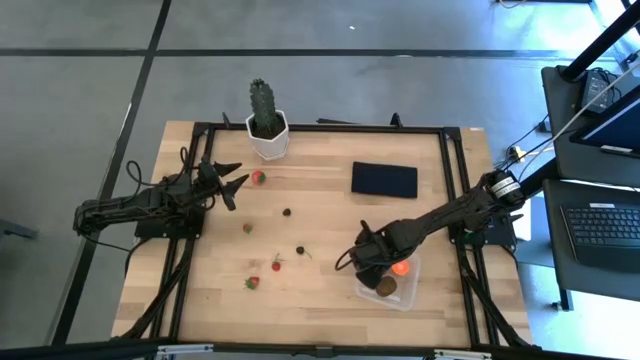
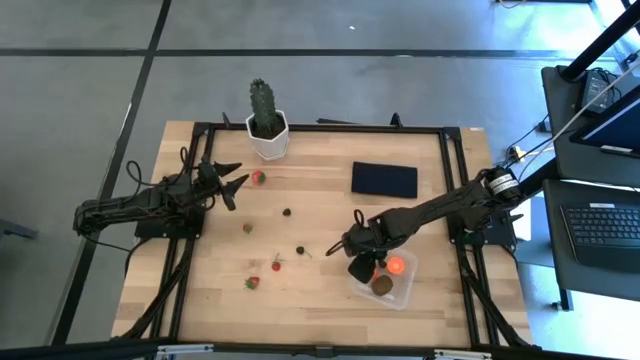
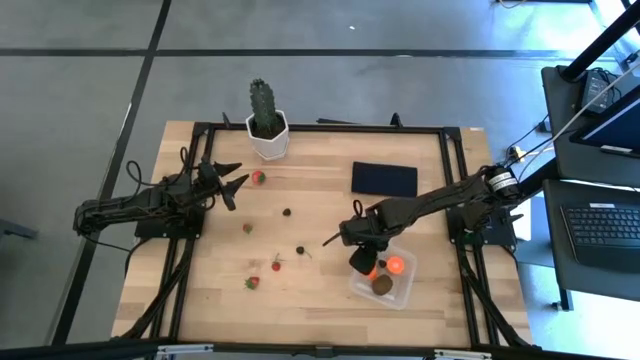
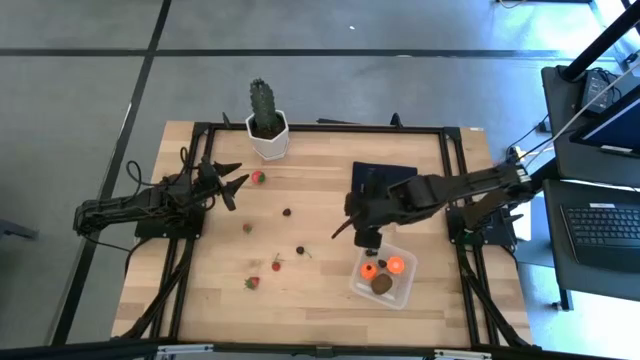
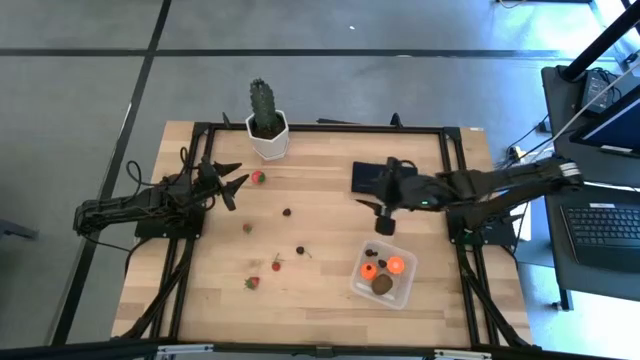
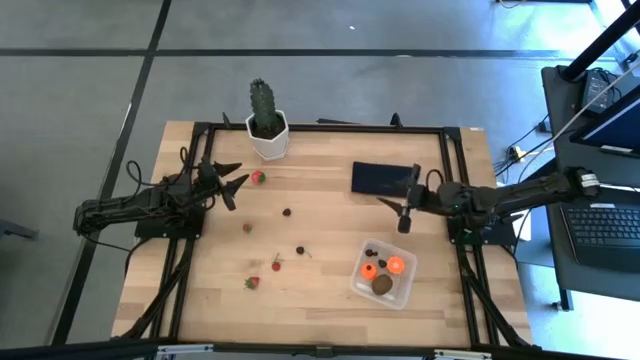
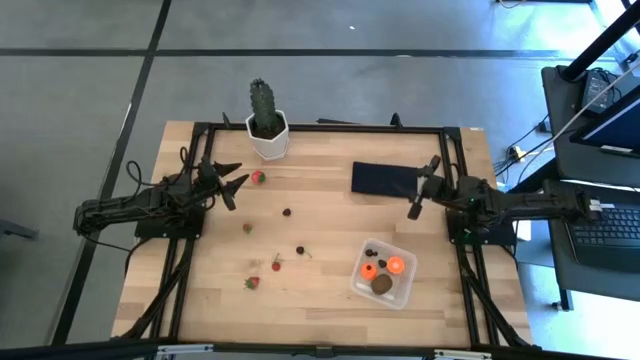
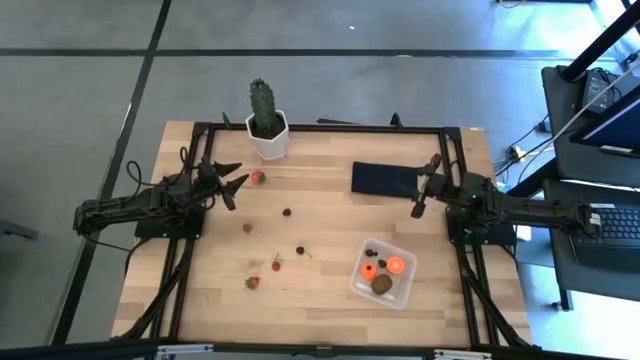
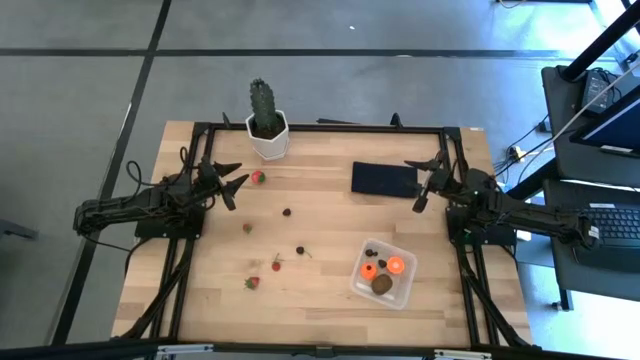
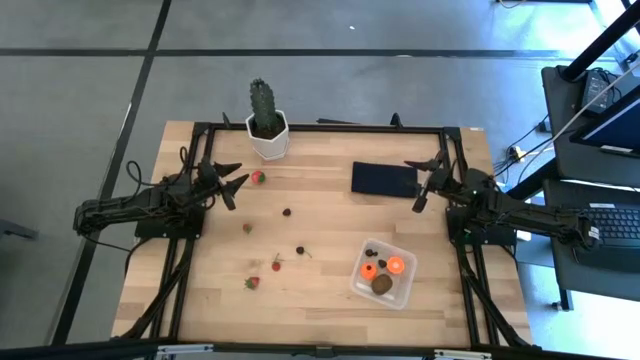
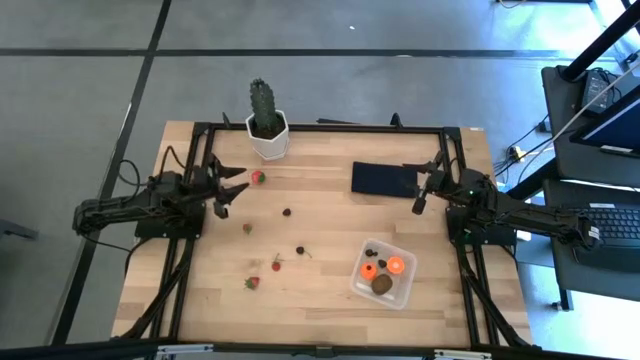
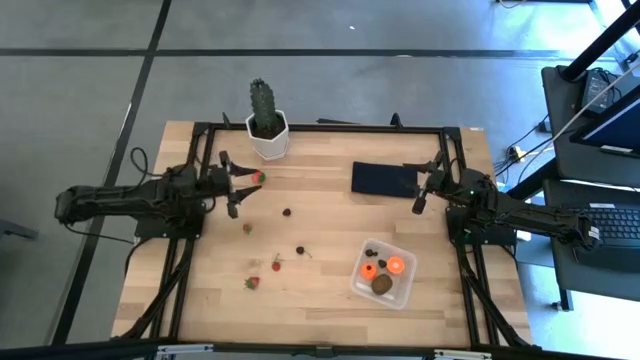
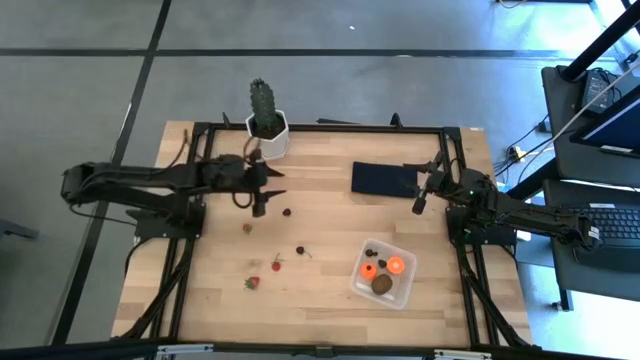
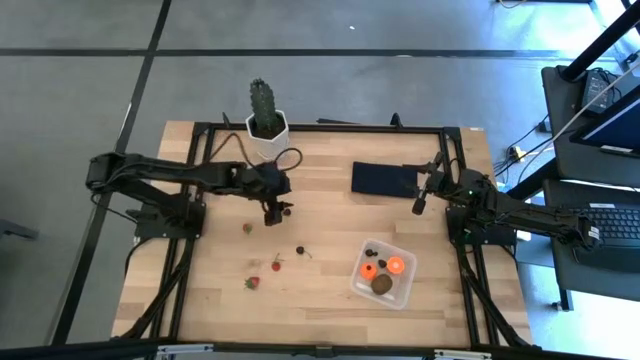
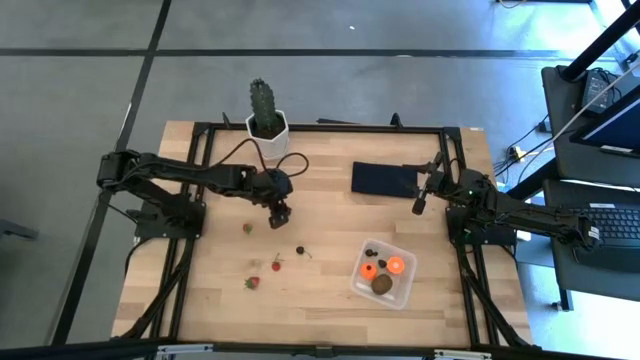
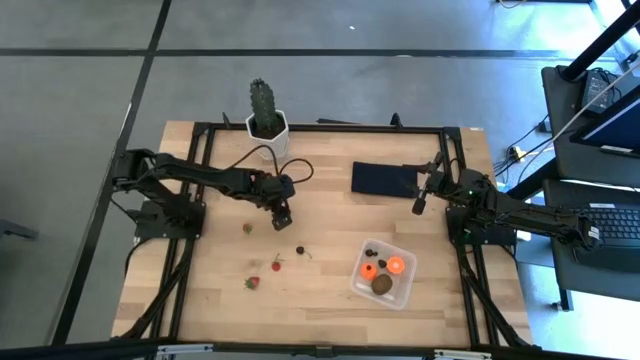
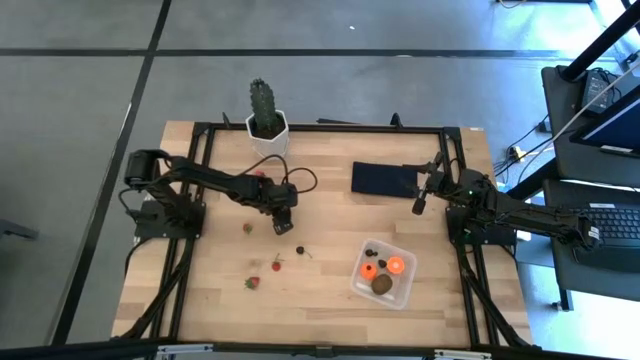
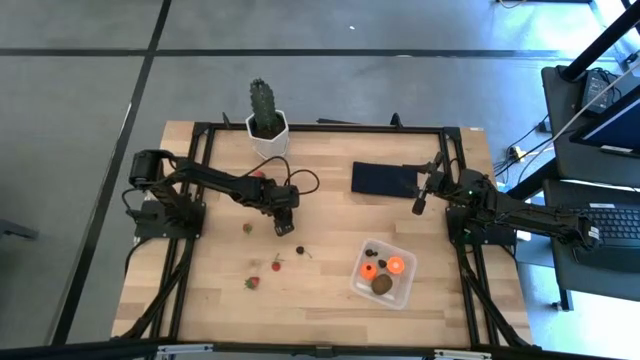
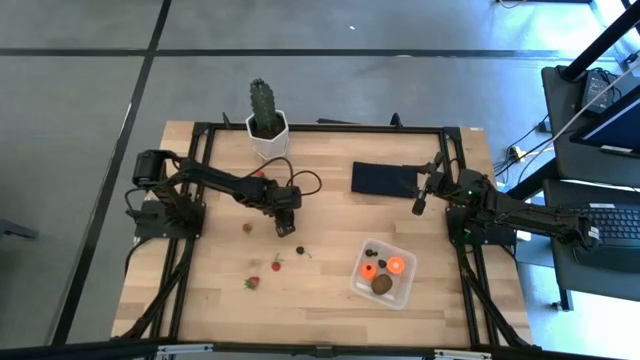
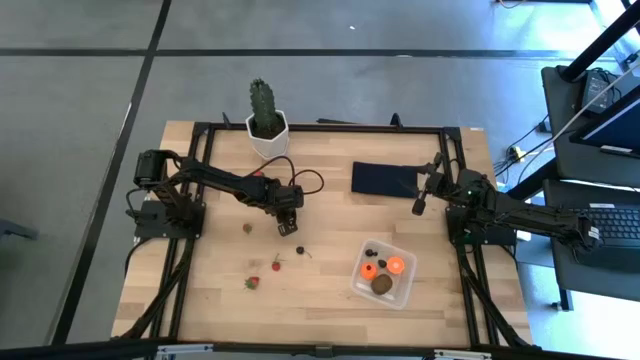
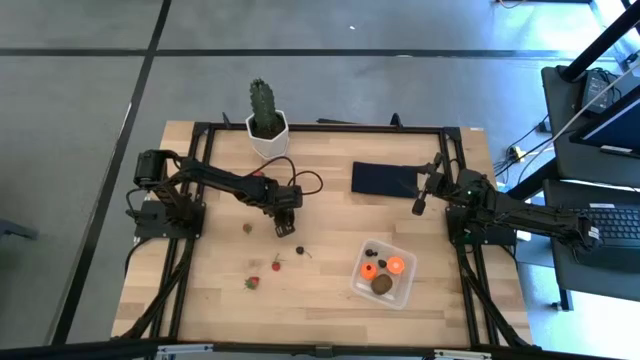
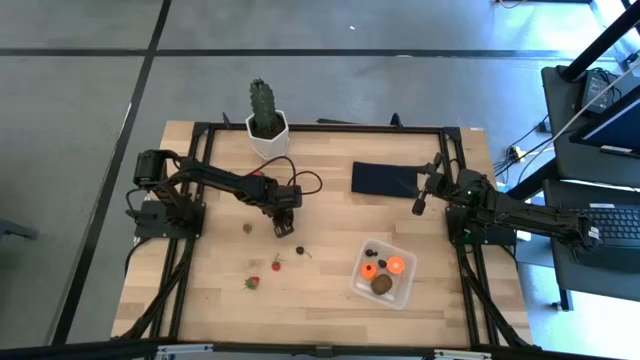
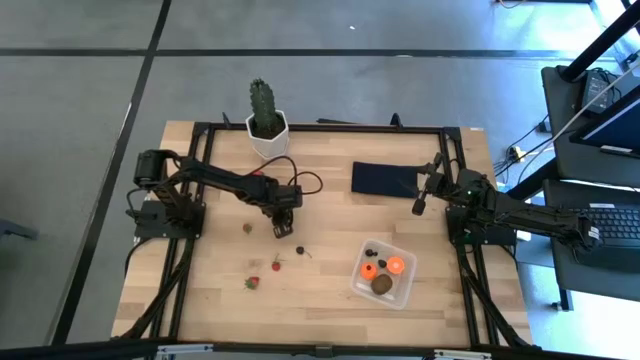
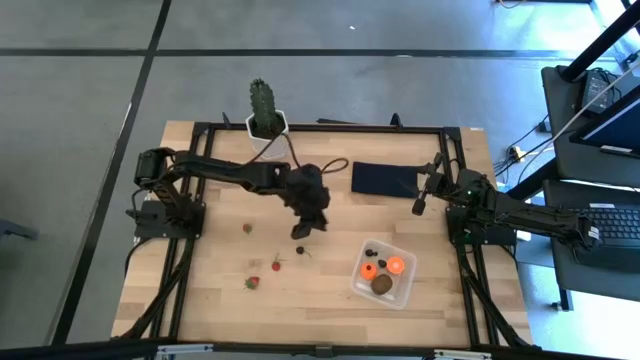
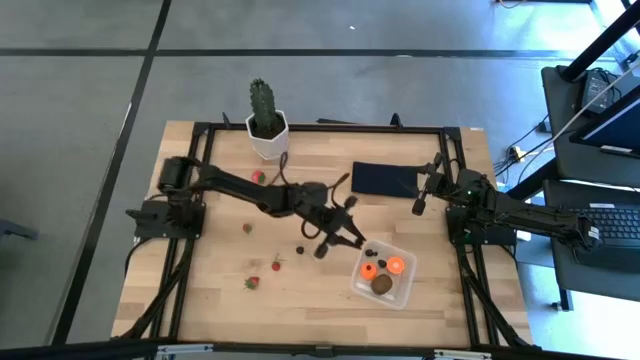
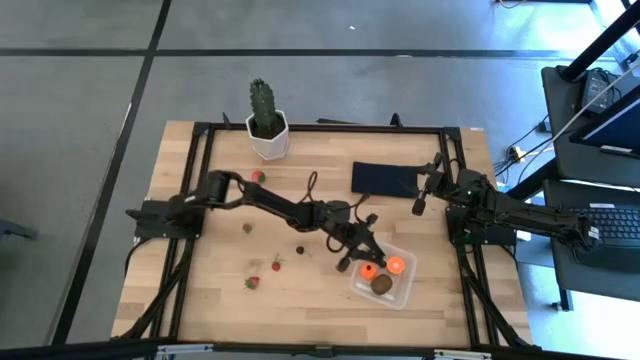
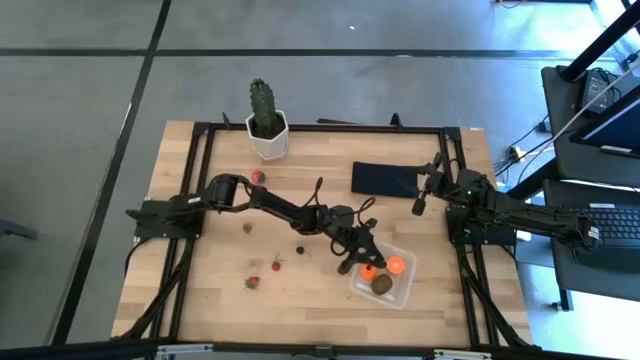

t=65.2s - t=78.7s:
Task: Pick and placing Produce into tupperware
Put the blackberry into the transparent bin

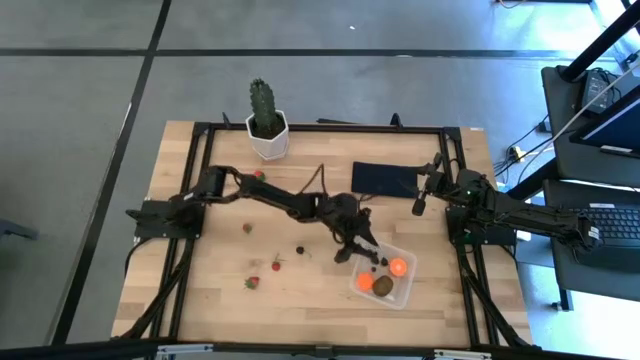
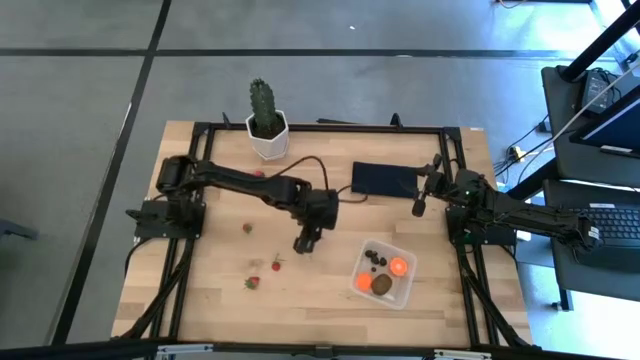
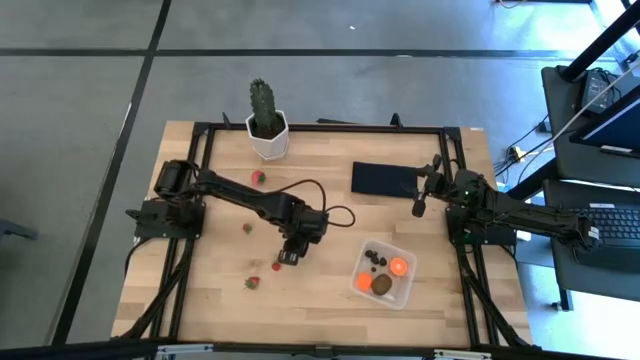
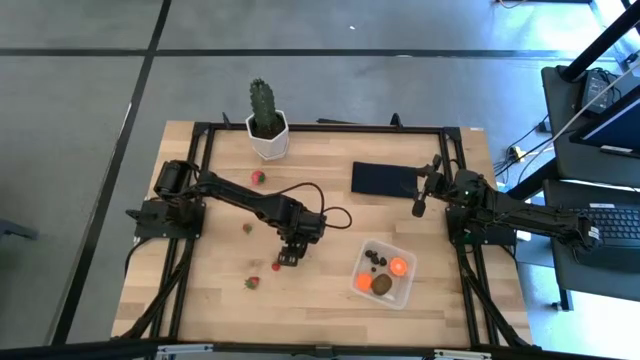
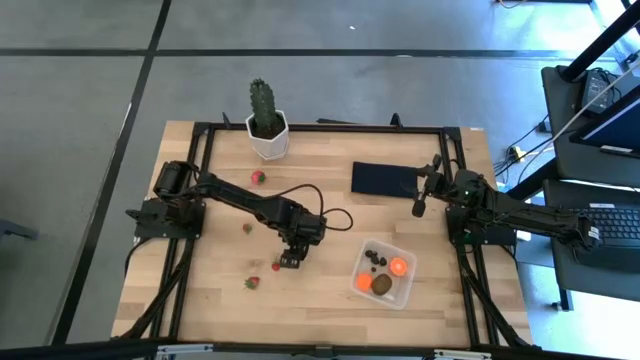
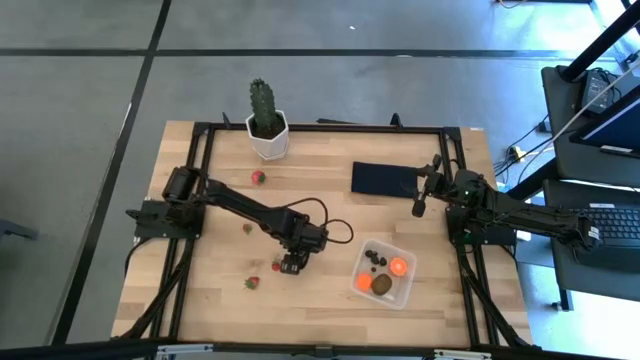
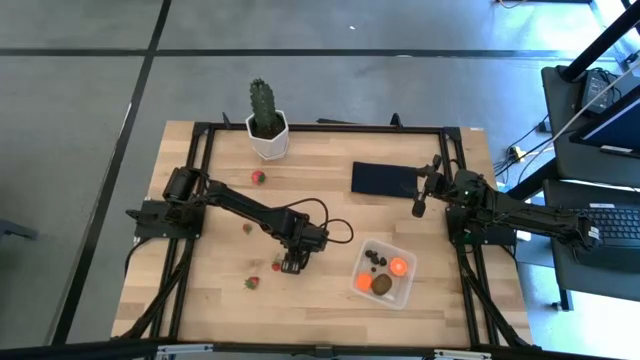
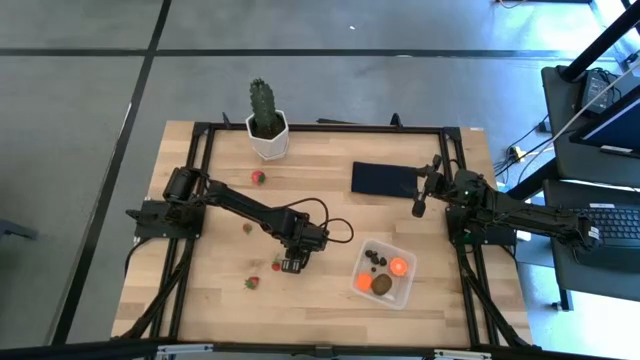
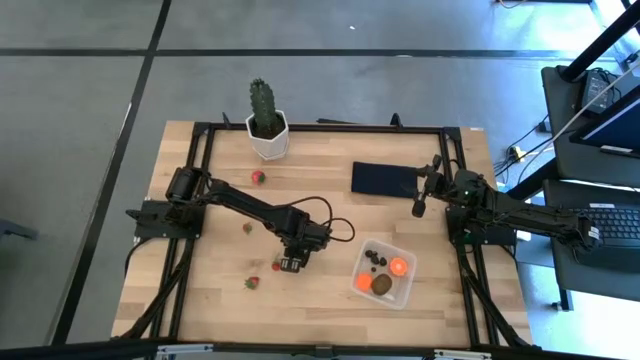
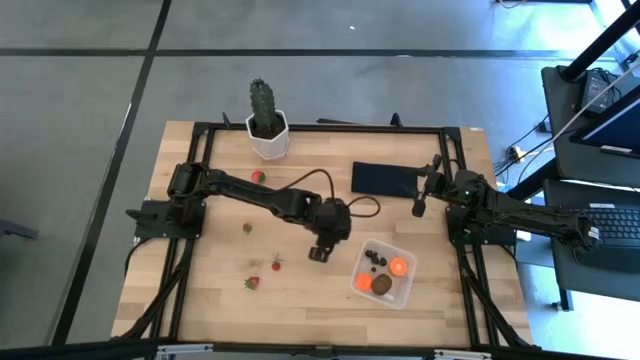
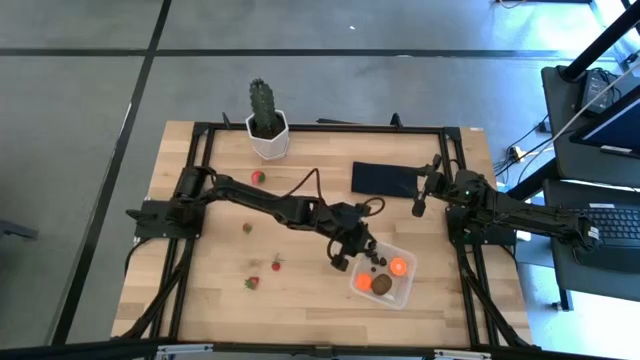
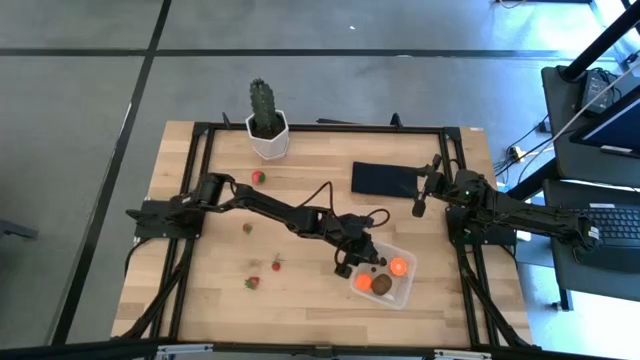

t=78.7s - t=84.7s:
Put the black cherry into the transparent bin

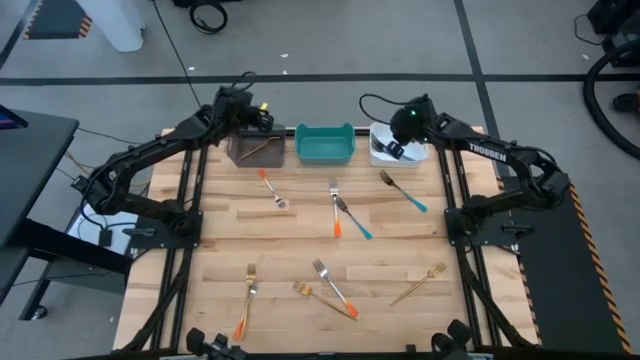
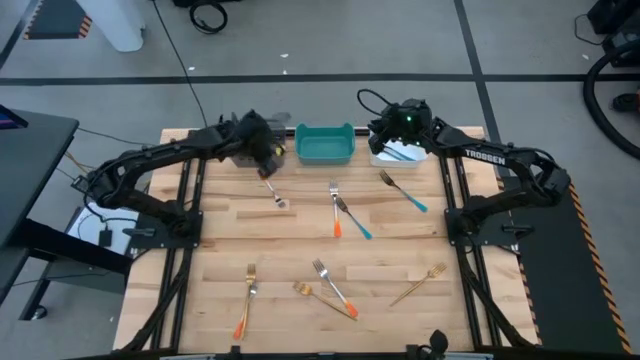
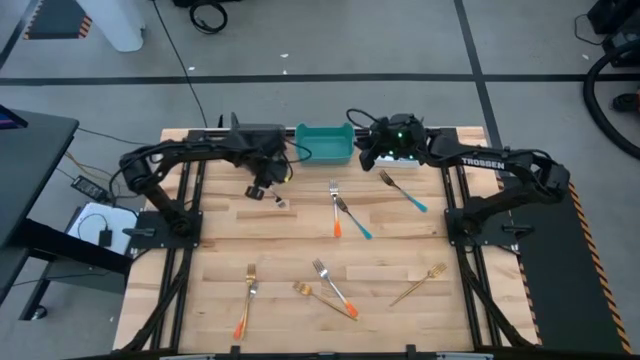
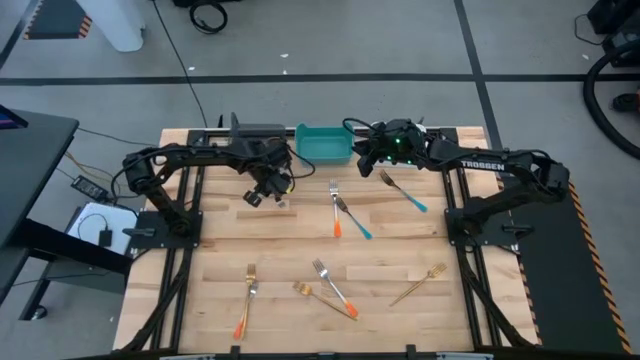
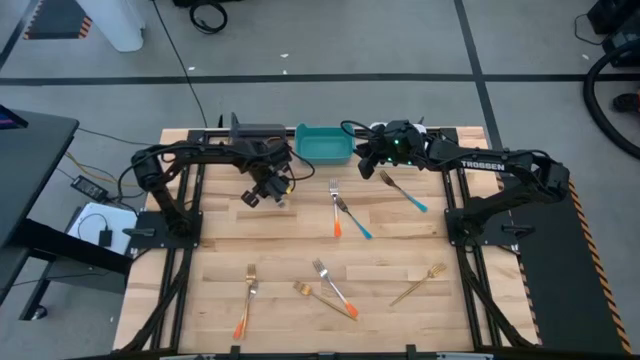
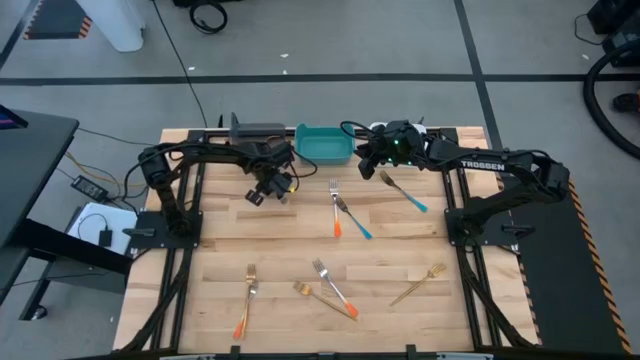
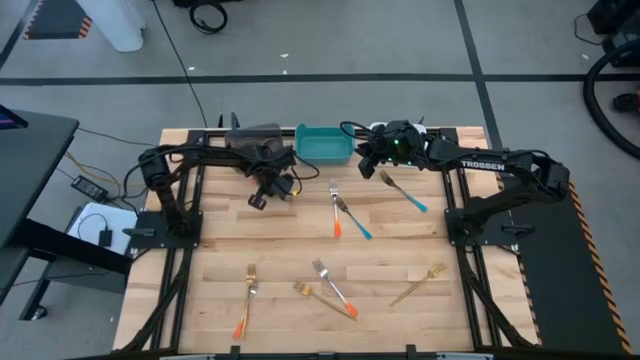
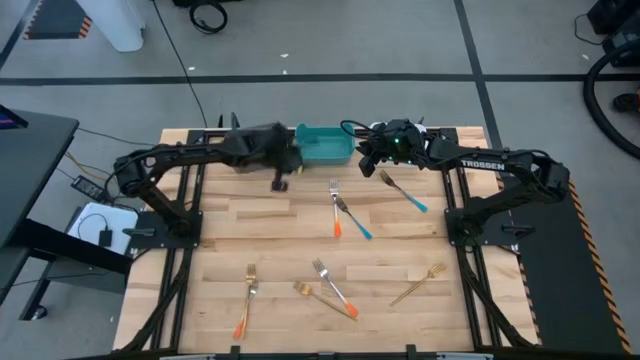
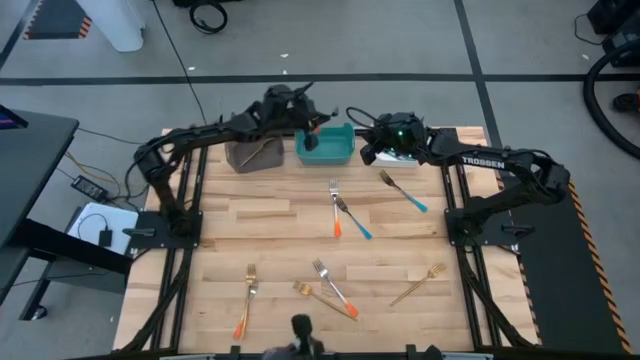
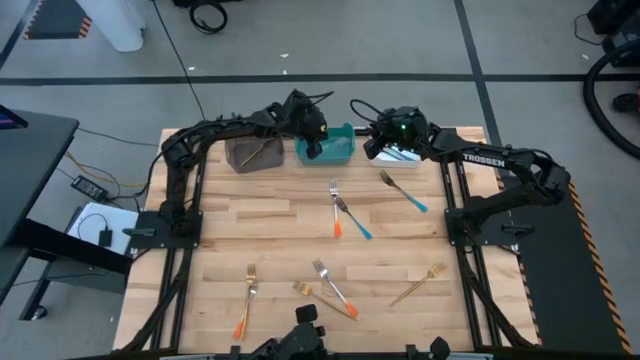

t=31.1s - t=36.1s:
Task: Sort silverware by color (type)
Put the orange fork into the blue bin
